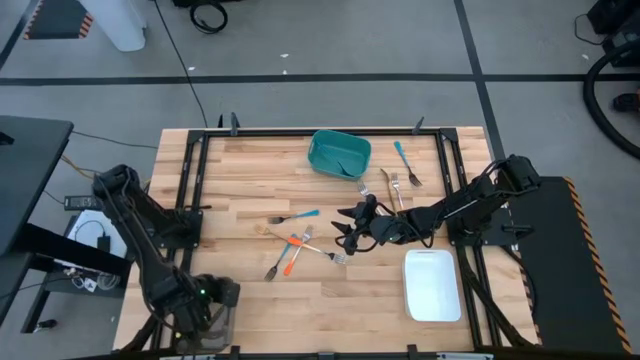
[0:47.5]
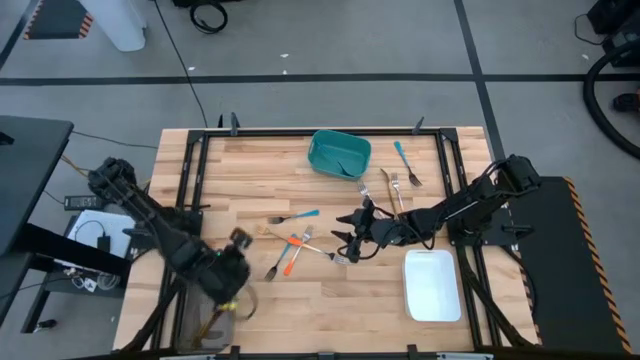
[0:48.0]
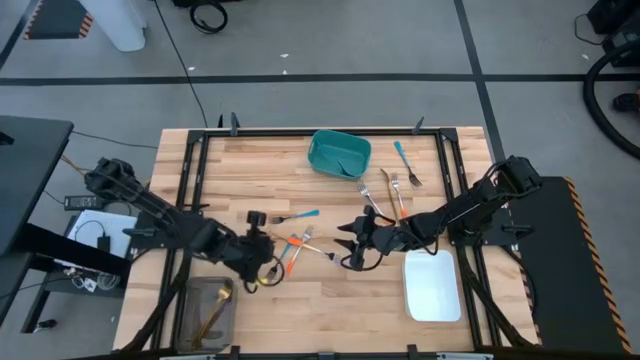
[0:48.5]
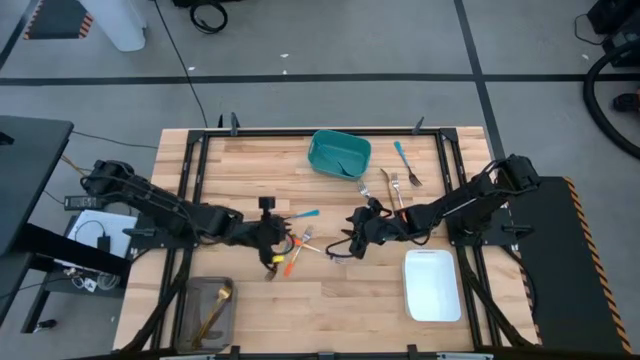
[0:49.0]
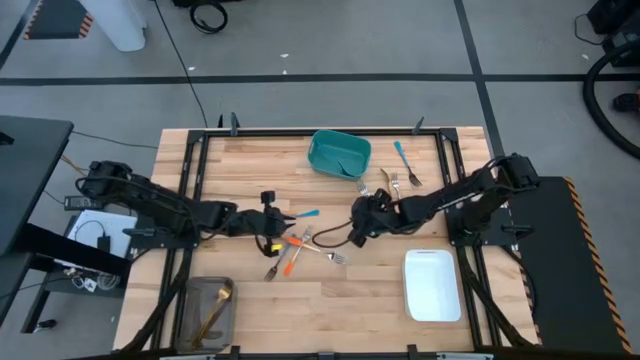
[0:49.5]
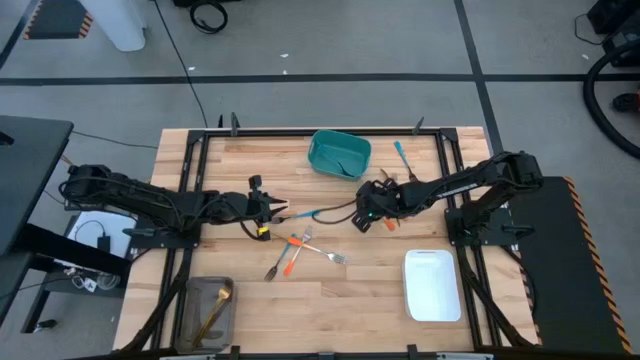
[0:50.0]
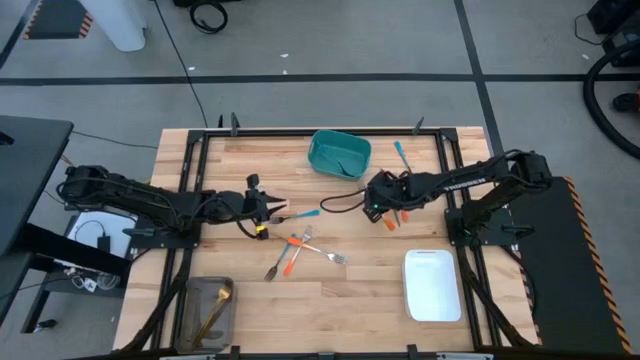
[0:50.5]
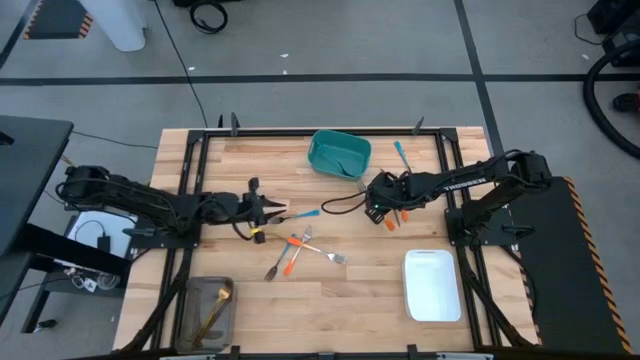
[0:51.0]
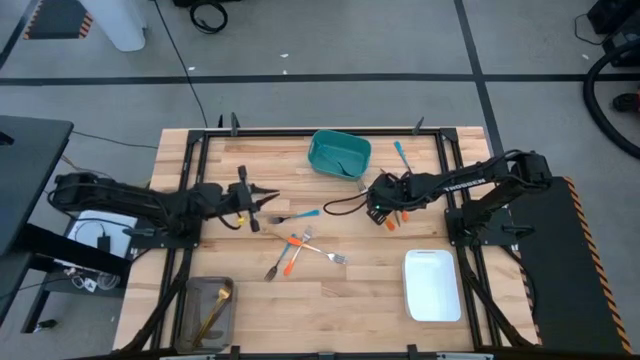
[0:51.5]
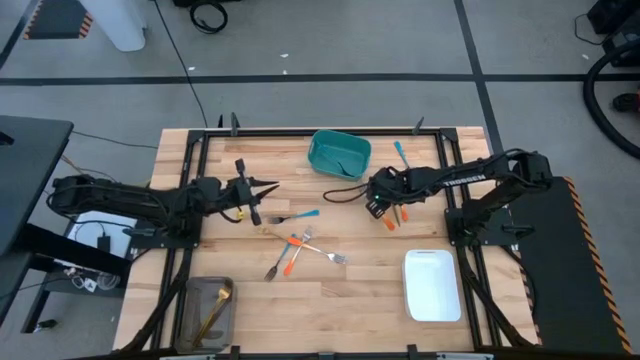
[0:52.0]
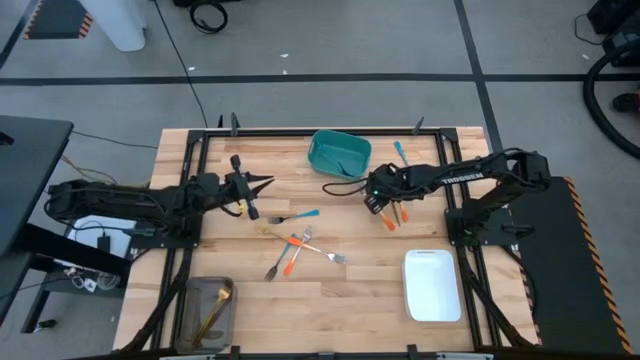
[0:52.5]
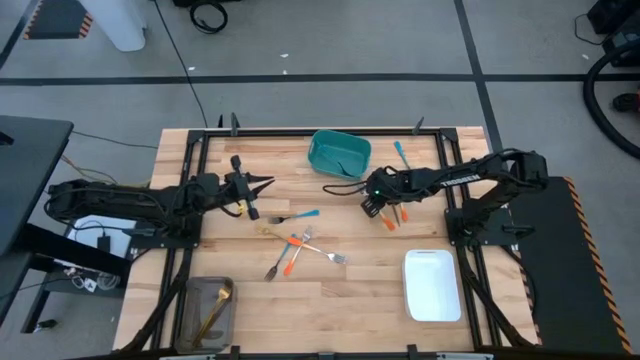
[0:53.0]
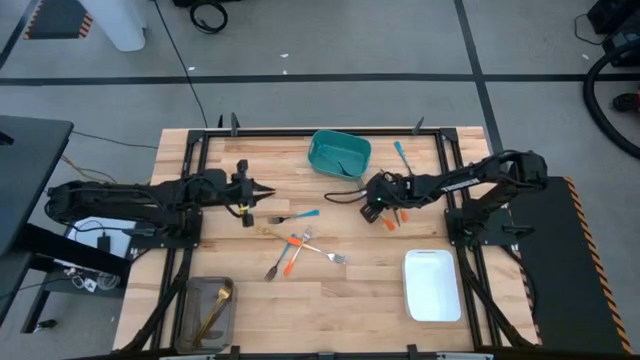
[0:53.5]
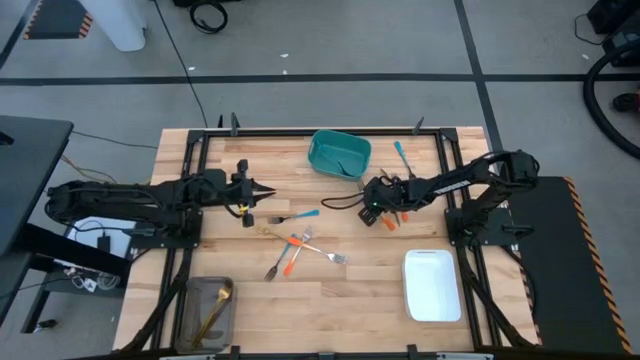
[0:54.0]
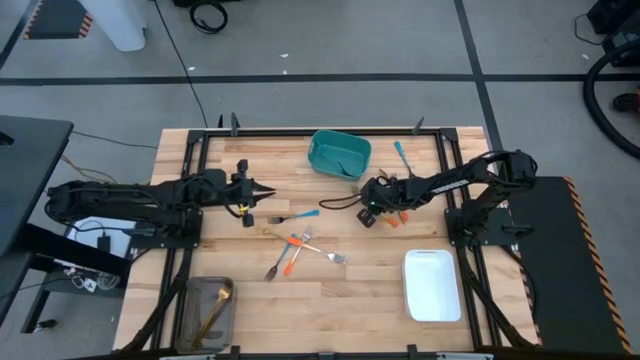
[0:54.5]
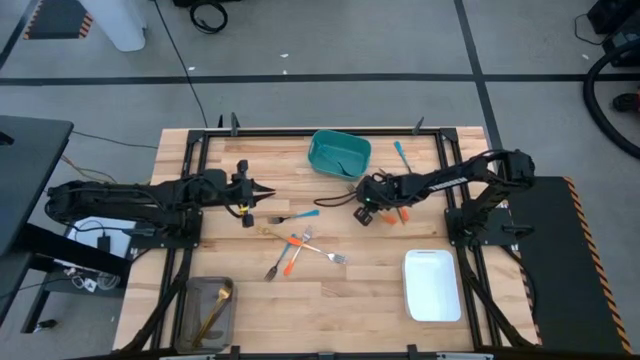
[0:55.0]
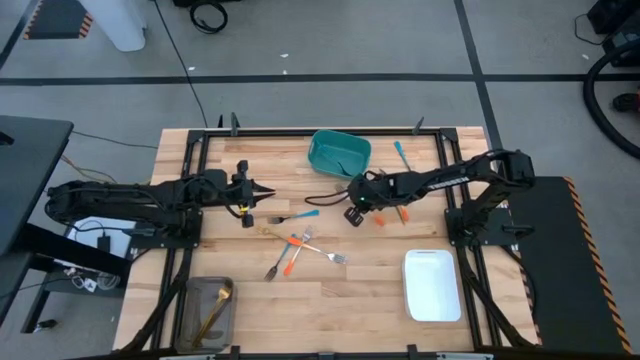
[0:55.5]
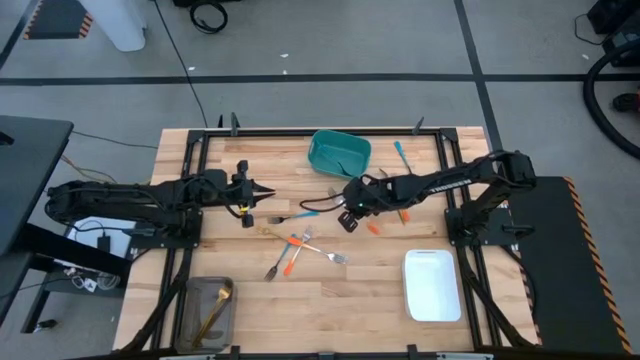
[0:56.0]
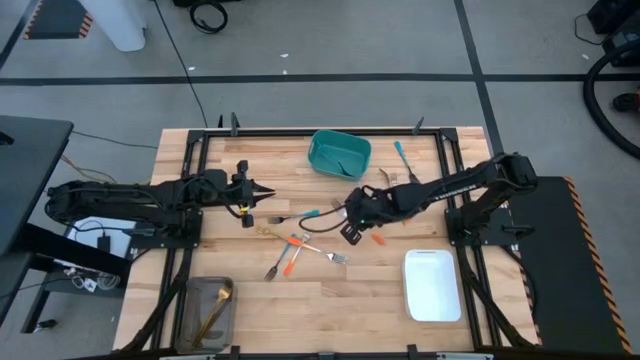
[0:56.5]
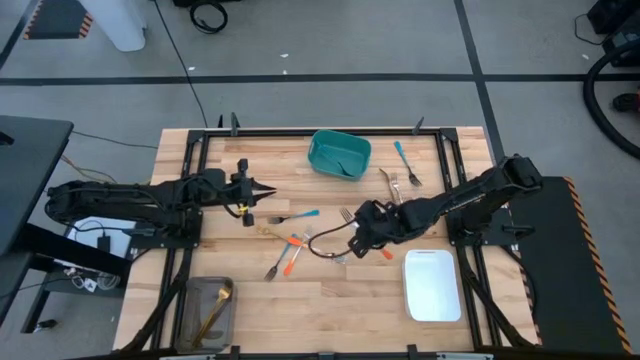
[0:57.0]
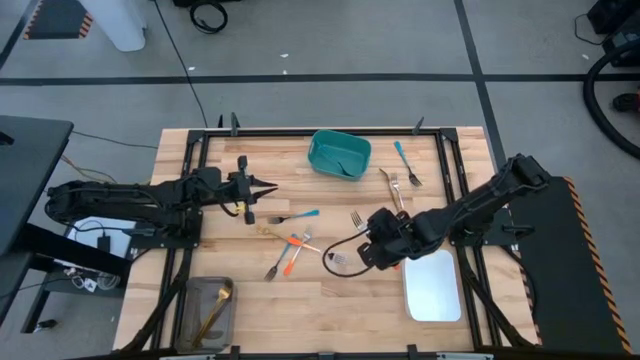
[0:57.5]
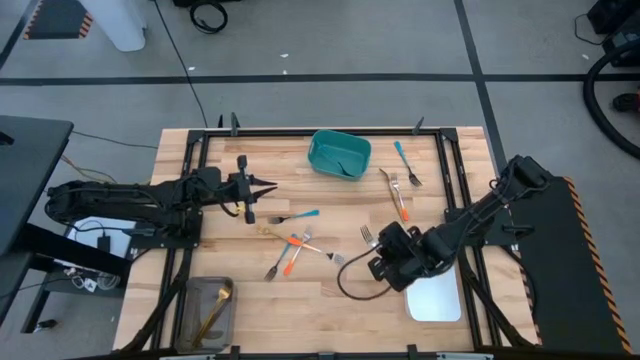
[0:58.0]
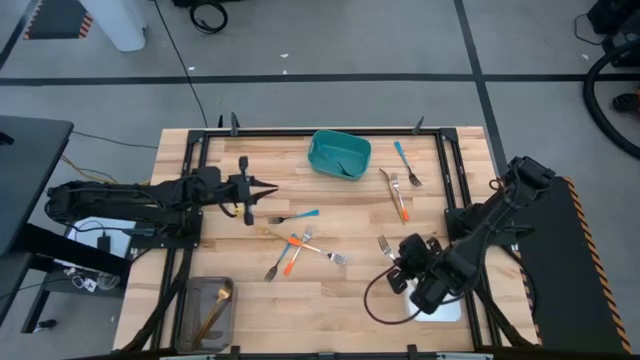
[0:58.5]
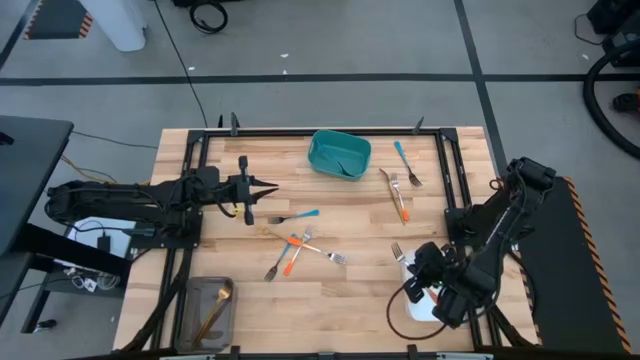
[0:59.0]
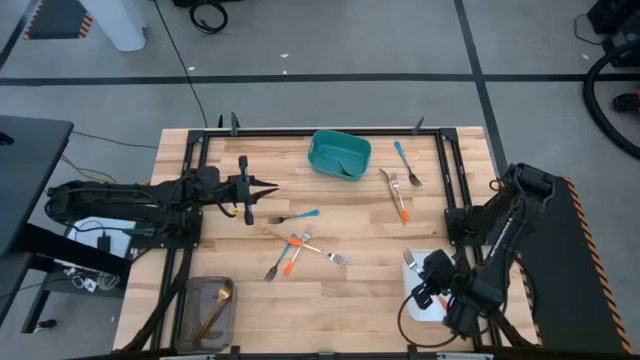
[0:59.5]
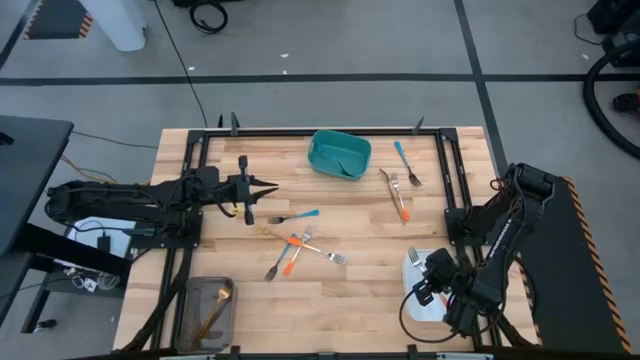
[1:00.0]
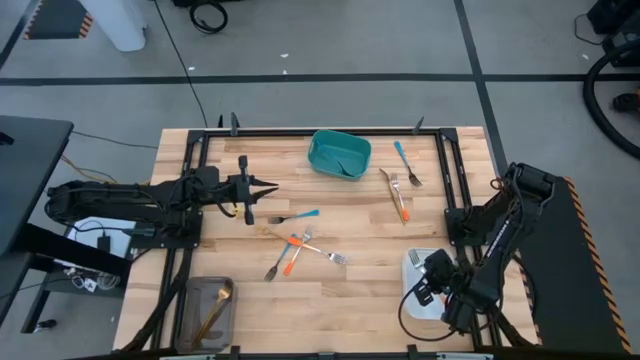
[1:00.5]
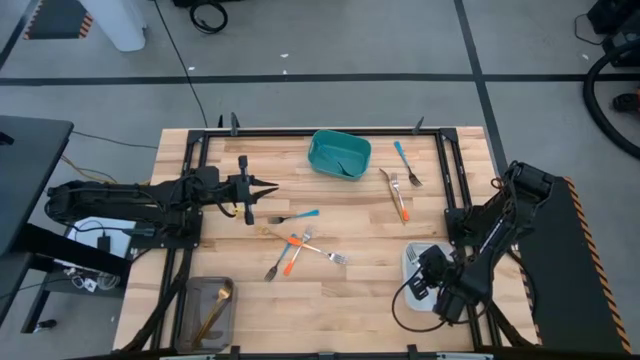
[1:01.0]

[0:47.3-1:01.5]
Task: Sort silverware by color (type)
Put the orange fork into the white bin

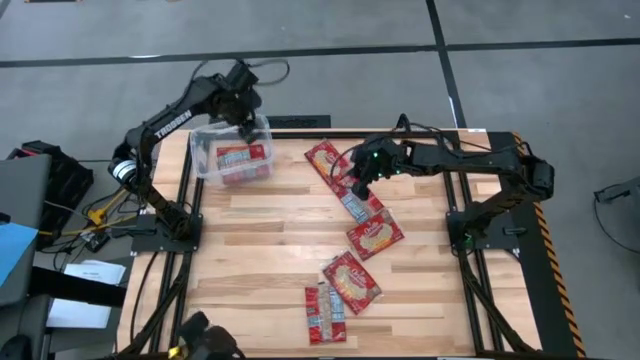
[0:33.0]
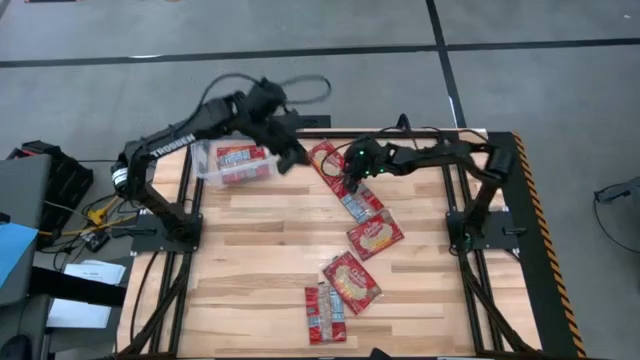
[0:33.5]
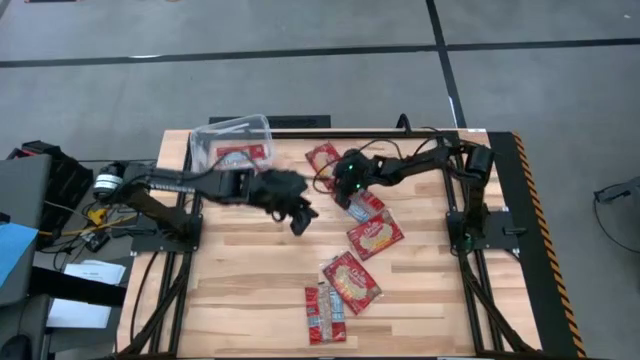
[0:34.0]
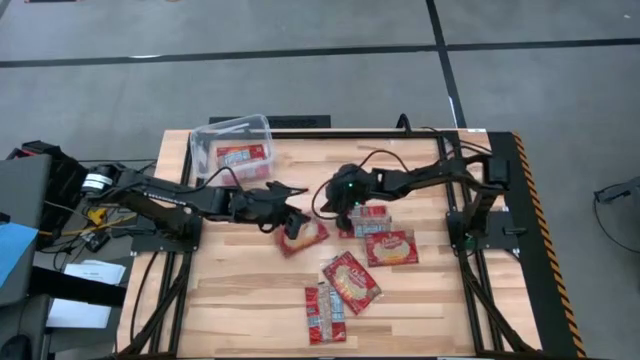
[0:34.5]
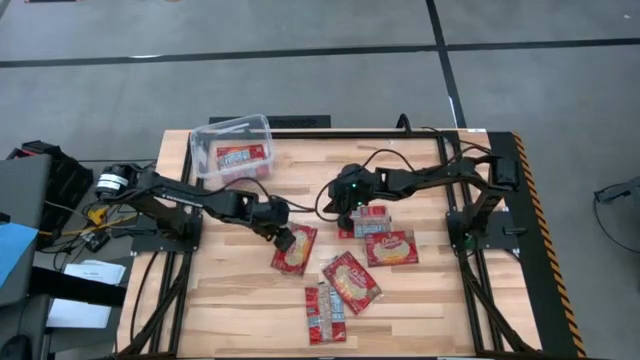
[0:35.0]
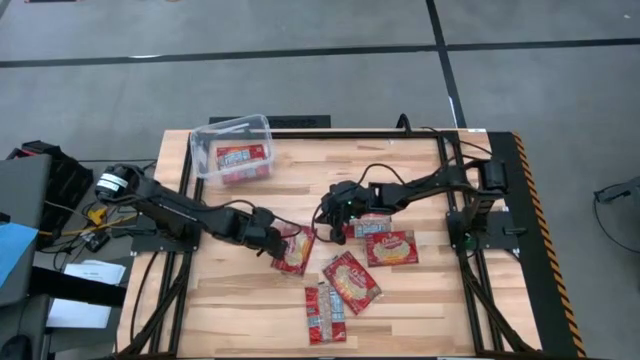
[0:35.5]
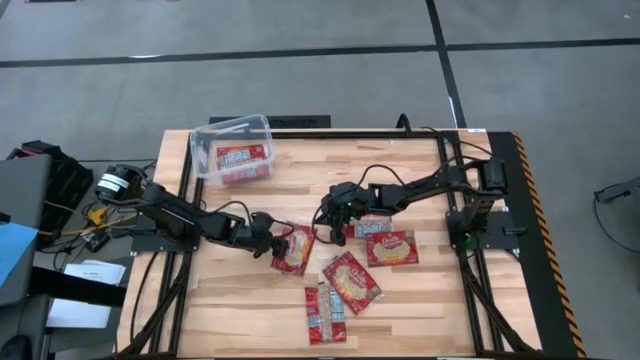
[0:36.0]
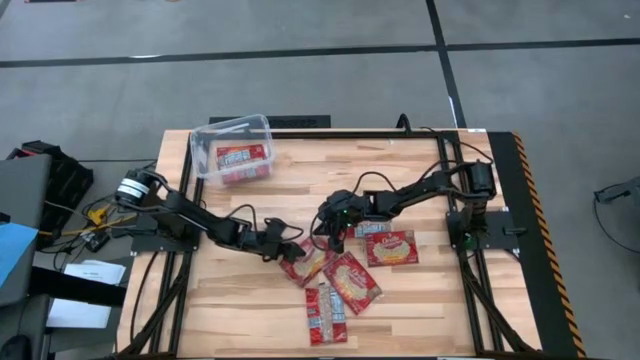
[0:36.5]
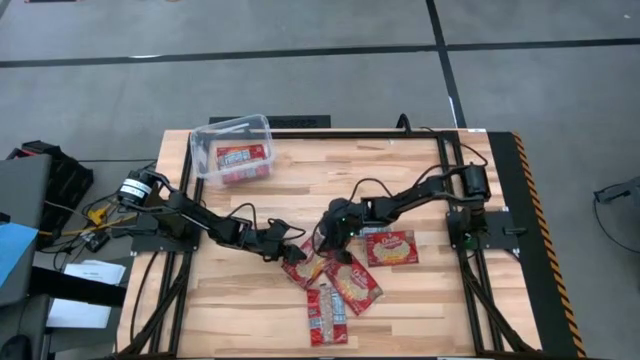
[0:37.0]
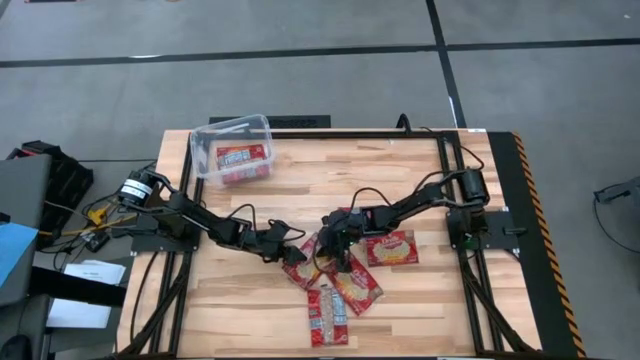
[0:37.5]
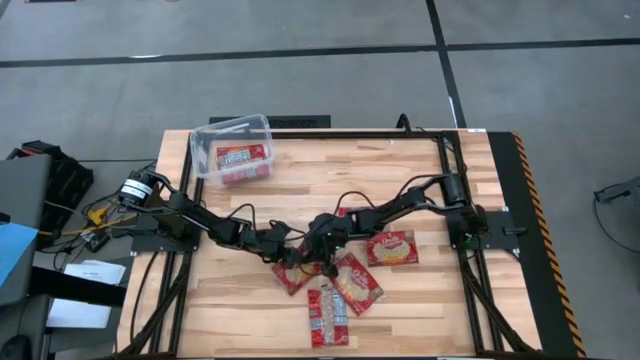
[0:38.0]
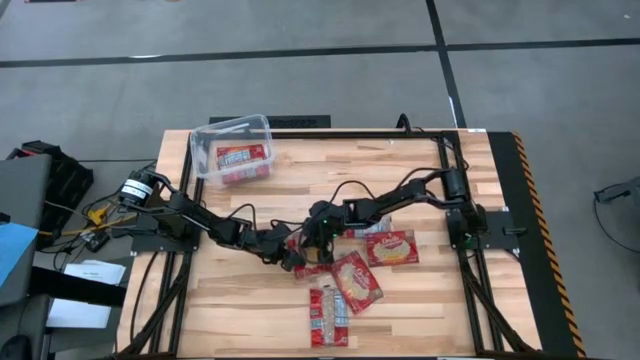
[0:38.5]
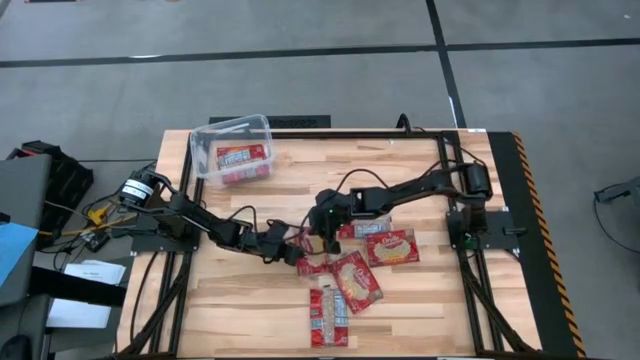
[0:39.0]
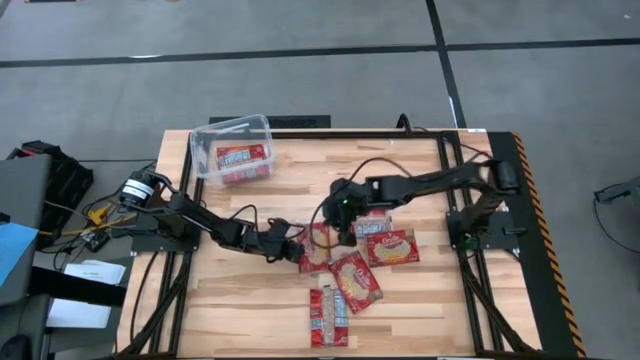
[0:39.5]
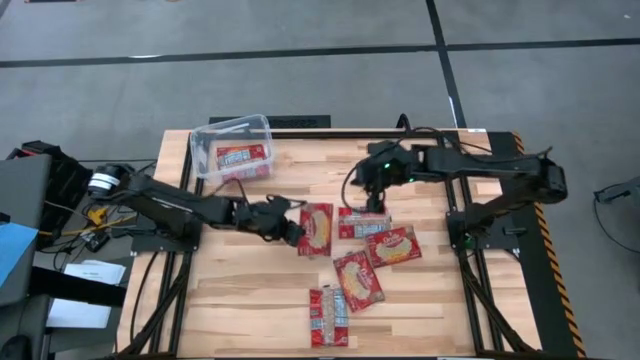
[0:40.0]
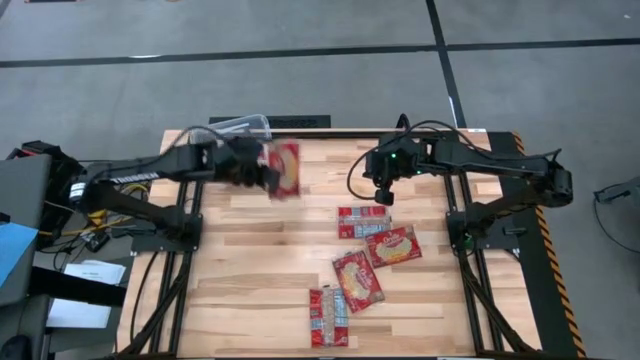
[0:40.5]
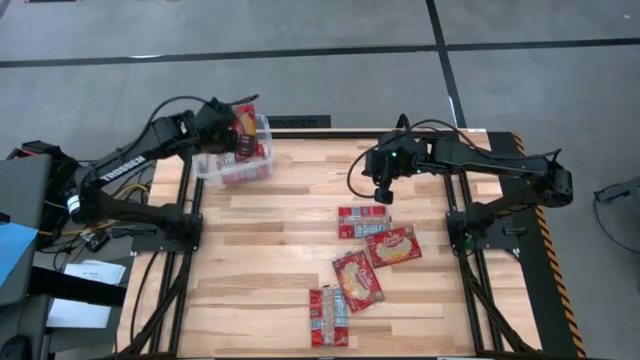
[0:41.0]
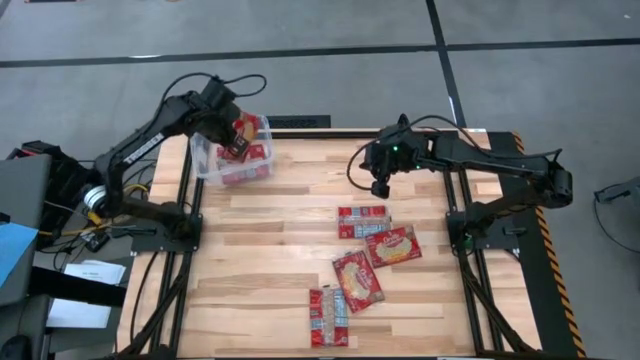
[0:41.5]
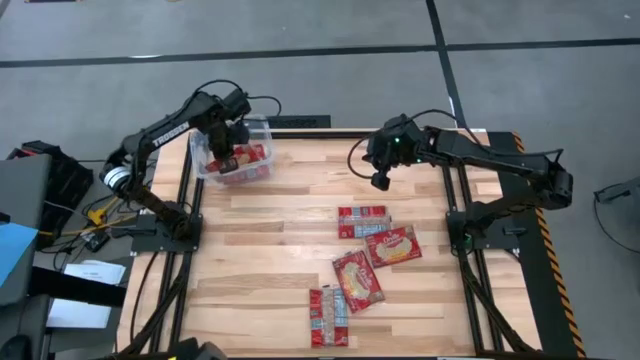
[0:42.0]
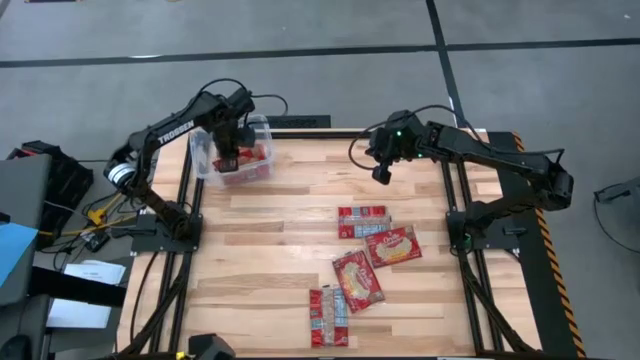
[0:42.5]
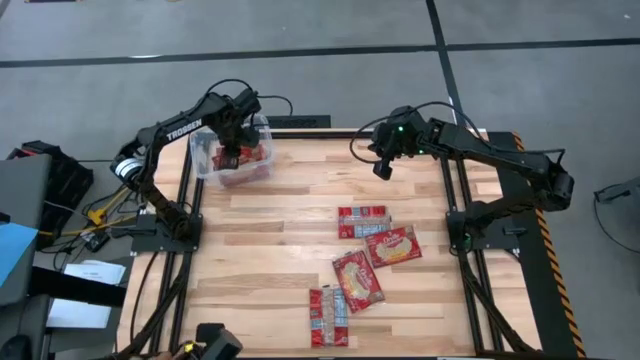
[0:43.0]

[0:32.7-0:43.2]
Task: Sort popcorn bags into baskets
Put the red popcorn bag into the transparent bin
